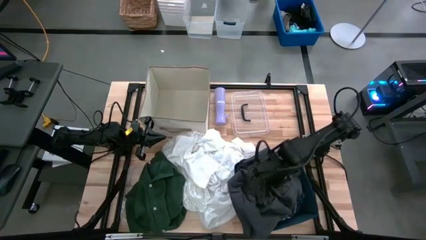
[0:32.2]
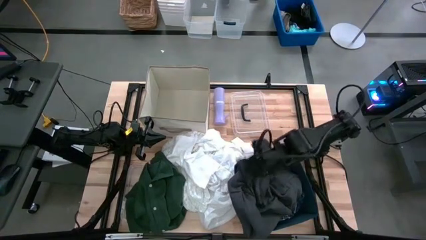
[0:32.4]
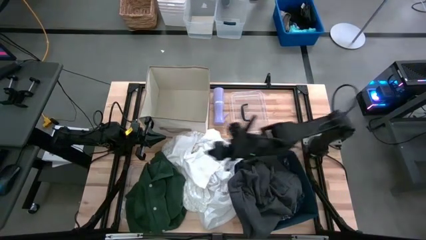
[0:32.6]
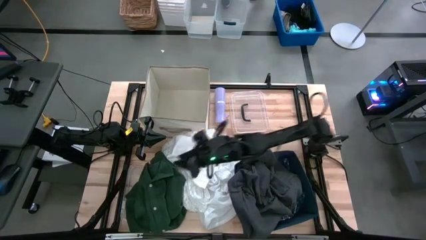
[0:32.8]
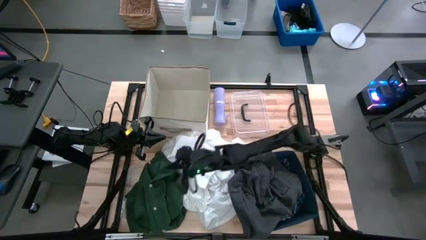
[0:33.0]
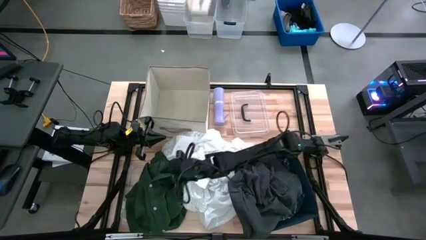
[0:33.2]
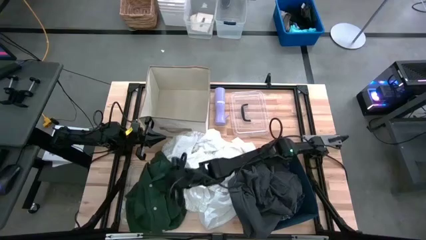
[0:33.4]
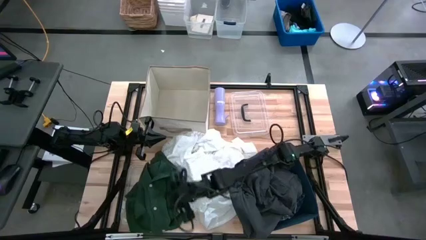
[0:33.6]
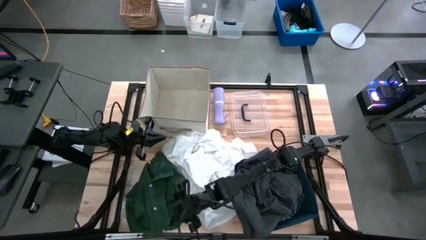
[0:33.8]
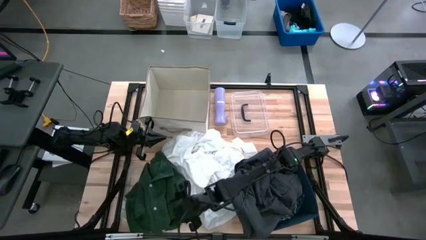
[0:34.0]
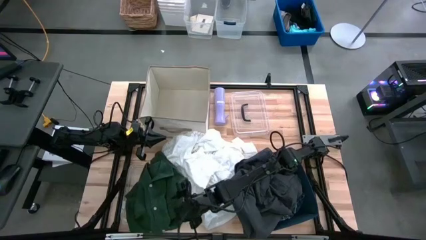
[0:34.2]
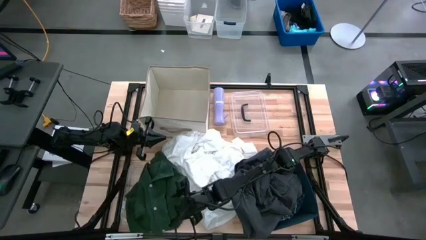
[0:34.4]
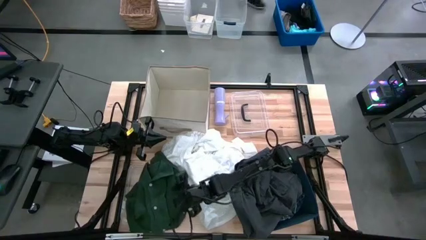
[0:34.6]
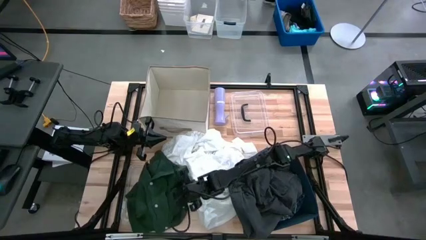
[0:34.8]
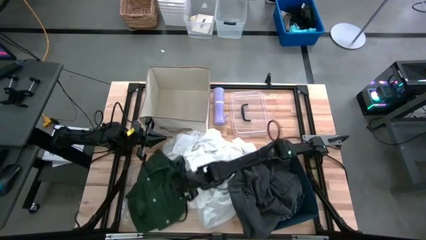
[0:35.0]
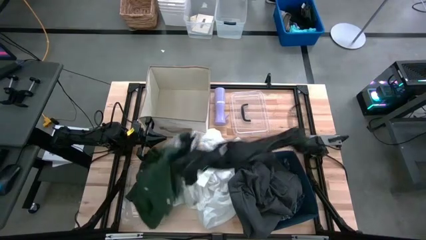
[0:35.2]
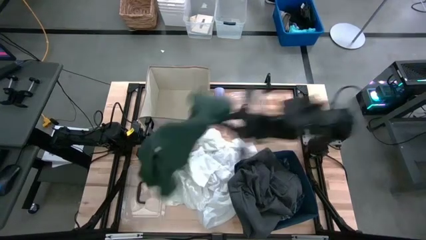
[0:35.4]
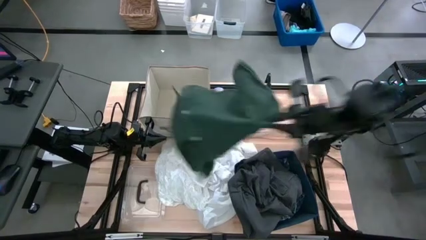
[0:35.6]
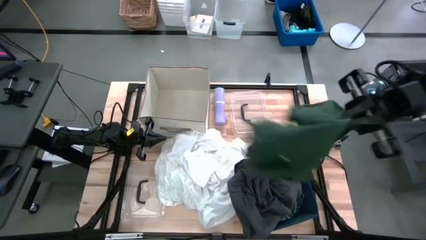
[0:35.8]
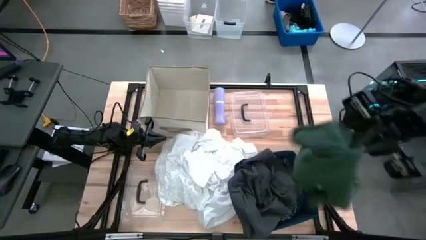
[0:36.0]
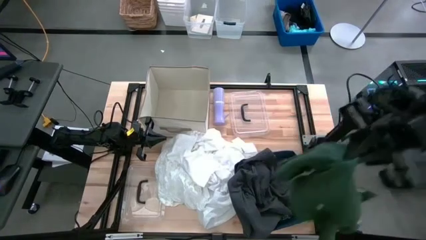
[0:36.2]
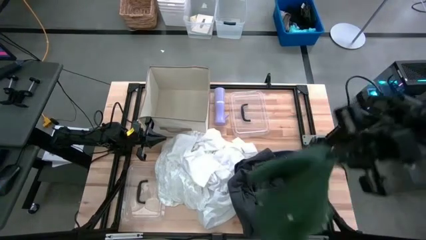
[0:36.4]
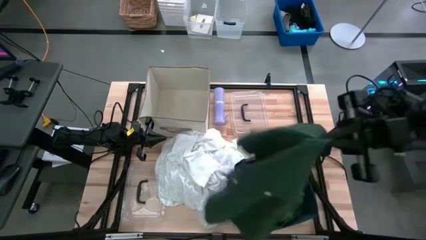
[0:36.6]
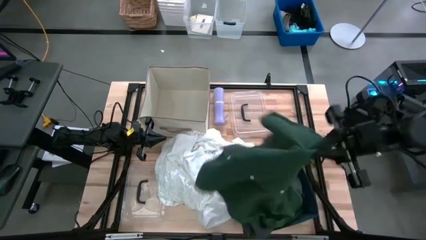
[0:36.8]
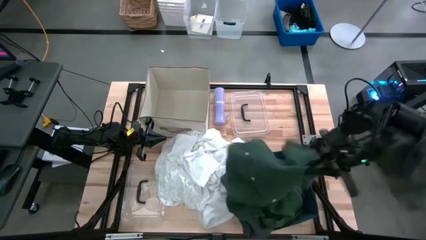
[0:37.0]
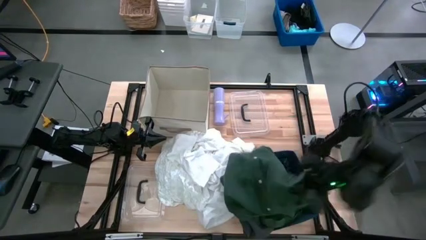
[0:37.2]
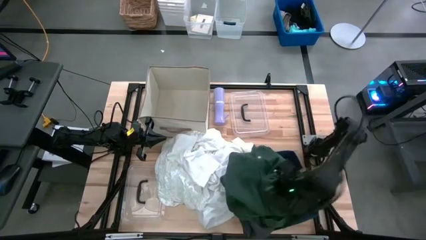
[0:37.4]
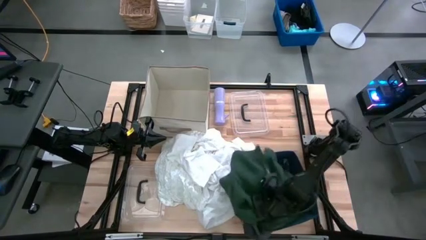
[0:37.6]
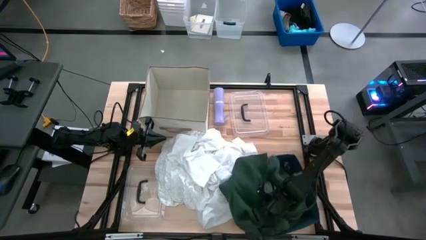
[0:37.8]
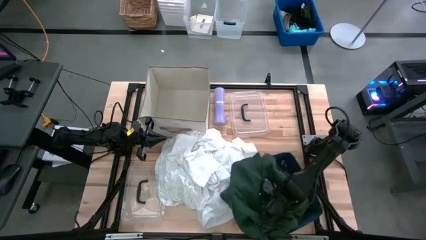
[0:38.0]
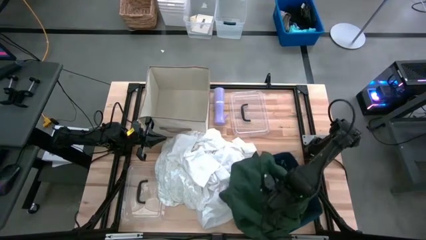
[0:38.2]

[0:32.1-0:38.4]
Task: Sort clothes
Put the green shirt into the blue laundry organizer

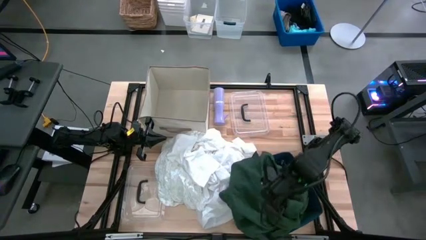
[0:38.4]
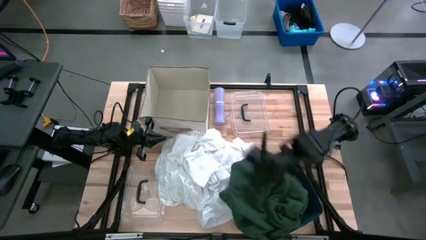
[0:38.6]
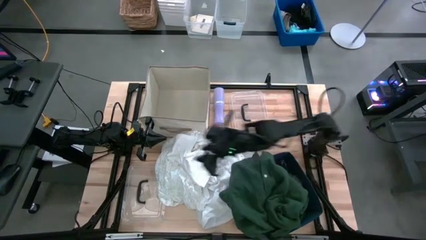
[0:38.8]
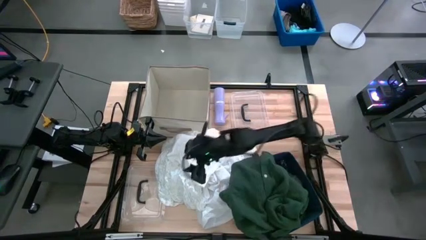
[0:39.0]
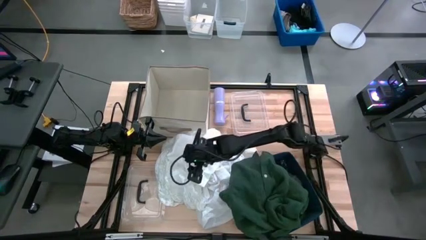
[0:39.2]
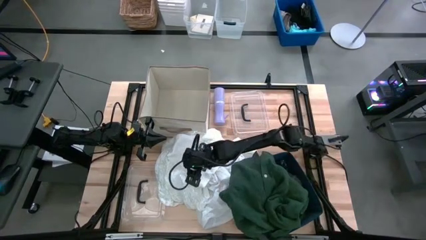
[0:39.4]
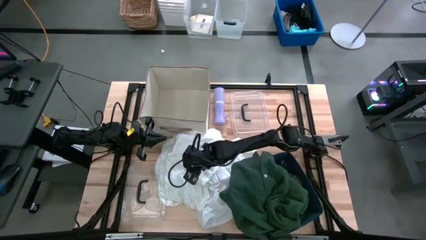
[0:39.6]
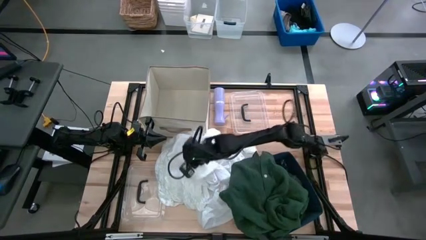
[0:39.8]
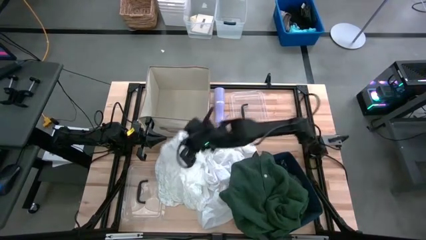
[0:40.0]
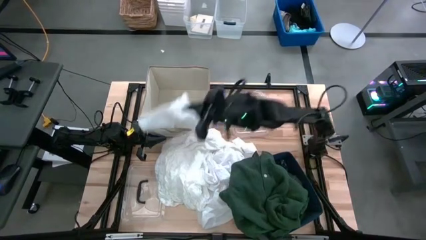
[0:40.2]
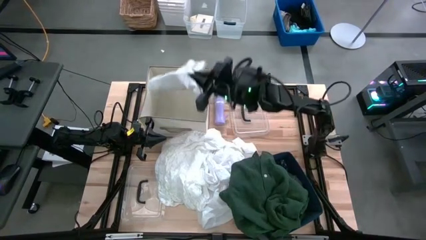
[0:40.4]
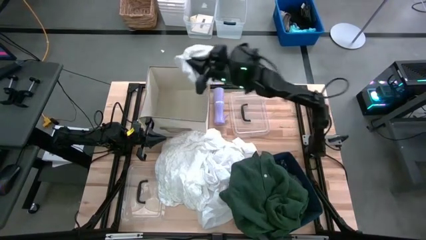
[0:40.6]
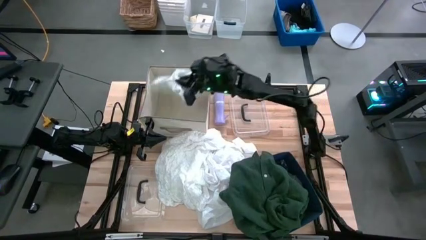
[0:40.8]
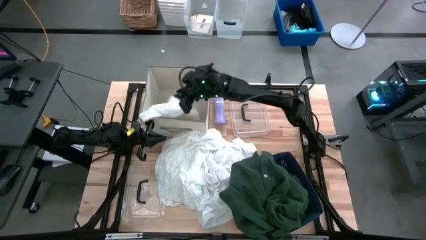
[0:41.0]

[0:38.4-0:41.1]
Put the white underwear into the light brown laundry organizer

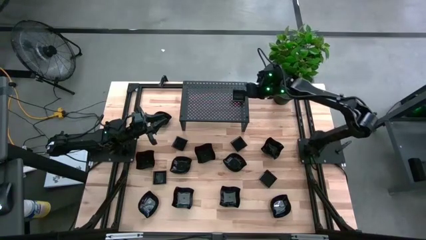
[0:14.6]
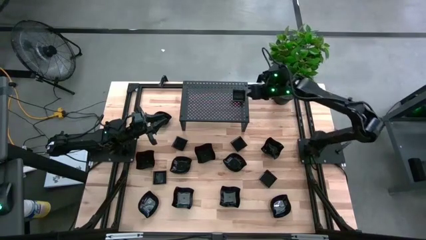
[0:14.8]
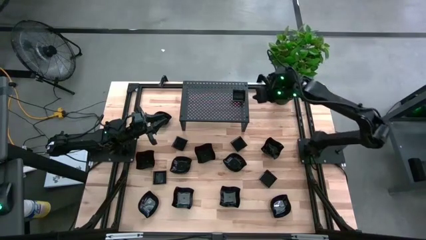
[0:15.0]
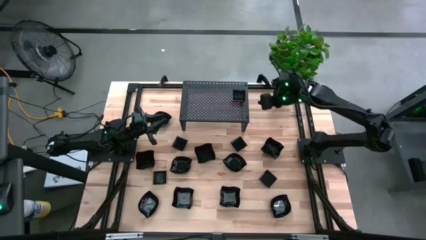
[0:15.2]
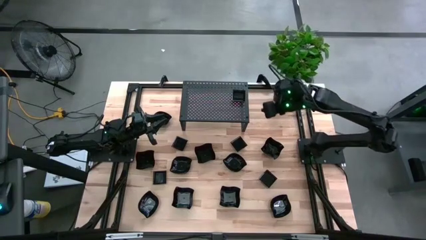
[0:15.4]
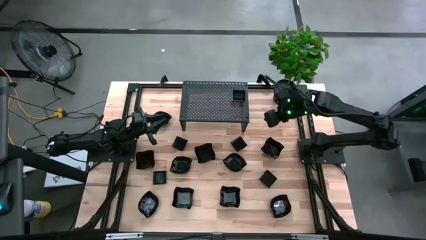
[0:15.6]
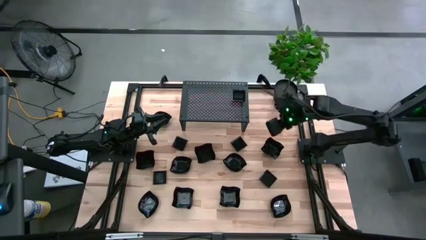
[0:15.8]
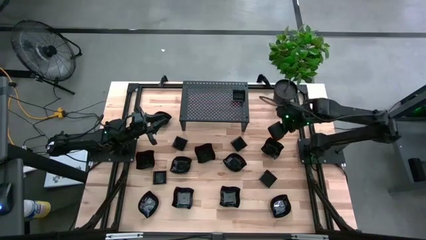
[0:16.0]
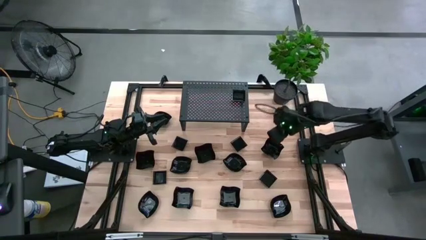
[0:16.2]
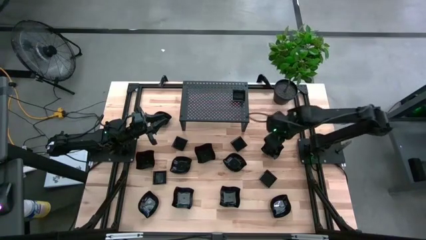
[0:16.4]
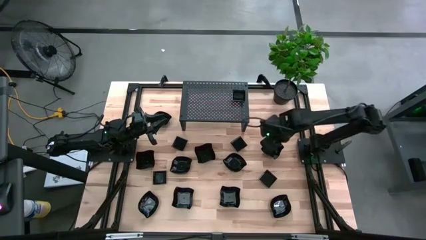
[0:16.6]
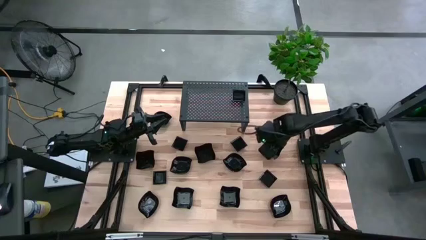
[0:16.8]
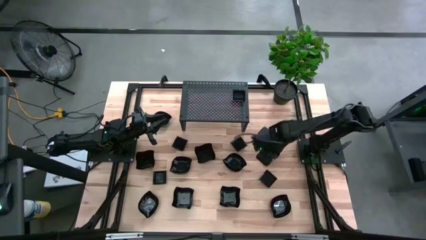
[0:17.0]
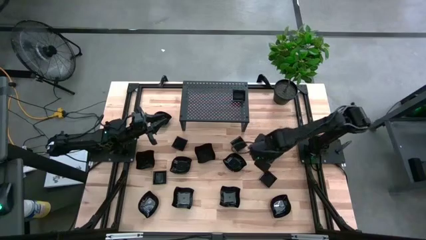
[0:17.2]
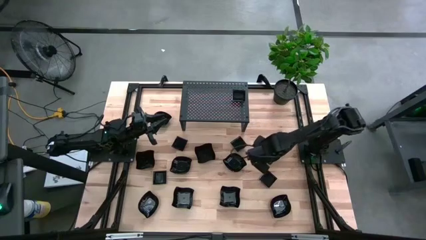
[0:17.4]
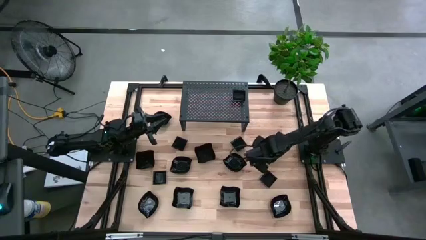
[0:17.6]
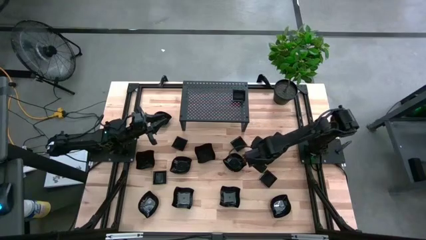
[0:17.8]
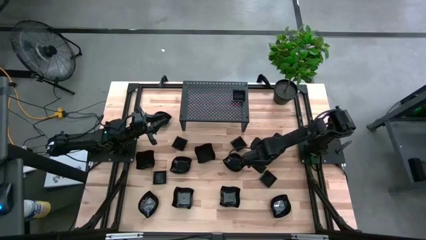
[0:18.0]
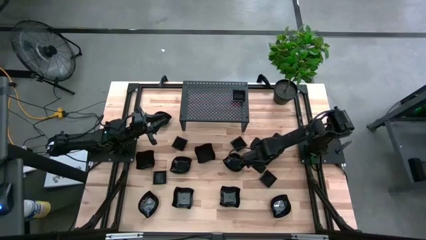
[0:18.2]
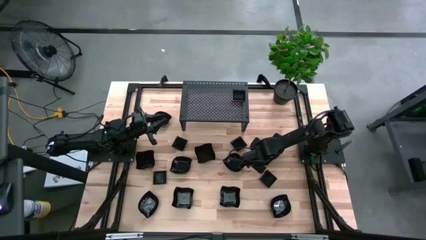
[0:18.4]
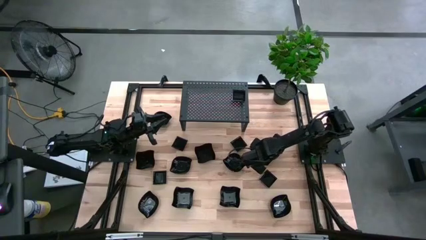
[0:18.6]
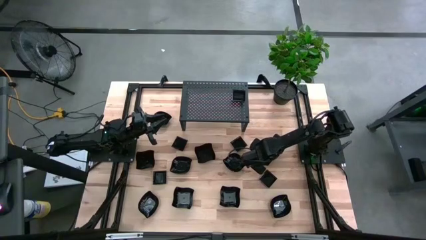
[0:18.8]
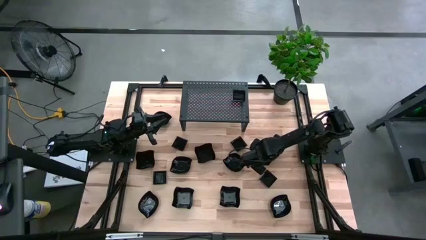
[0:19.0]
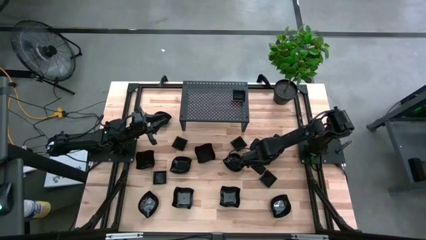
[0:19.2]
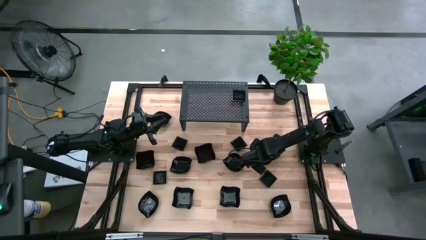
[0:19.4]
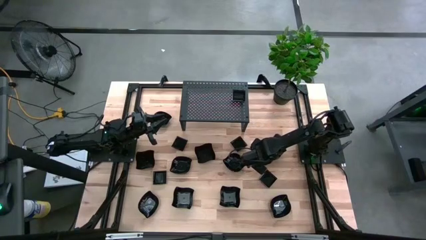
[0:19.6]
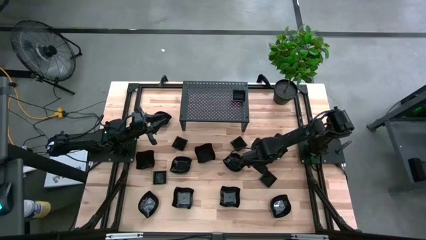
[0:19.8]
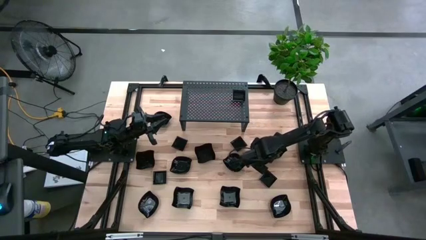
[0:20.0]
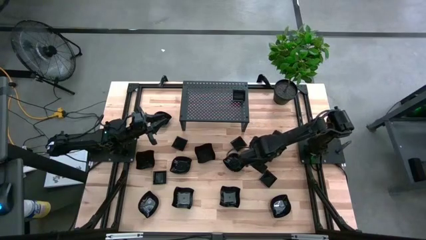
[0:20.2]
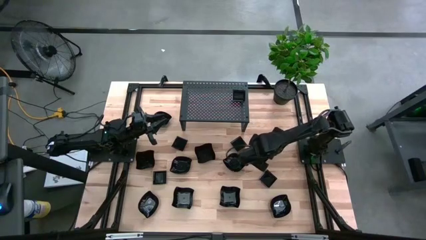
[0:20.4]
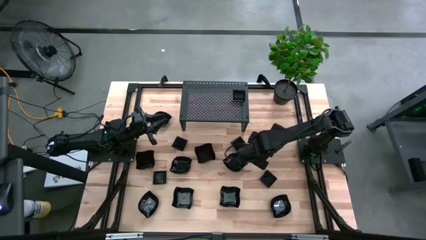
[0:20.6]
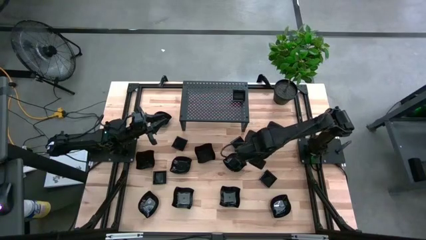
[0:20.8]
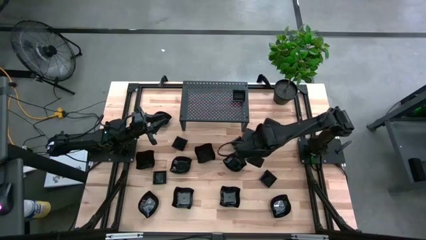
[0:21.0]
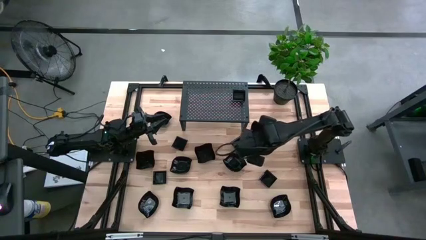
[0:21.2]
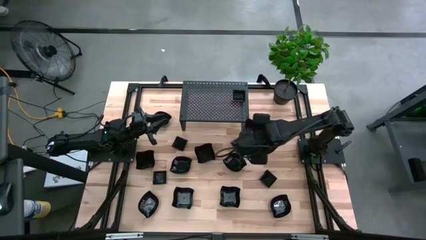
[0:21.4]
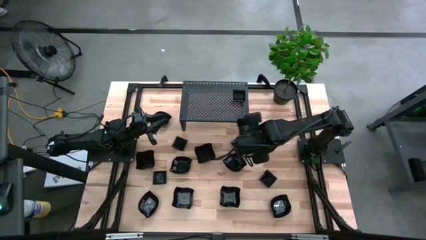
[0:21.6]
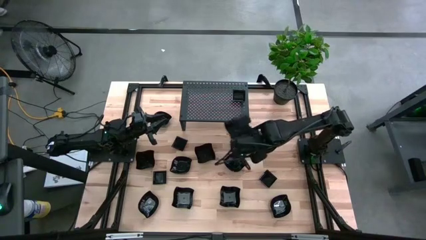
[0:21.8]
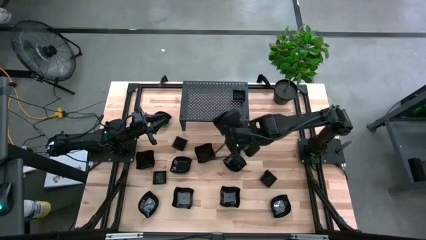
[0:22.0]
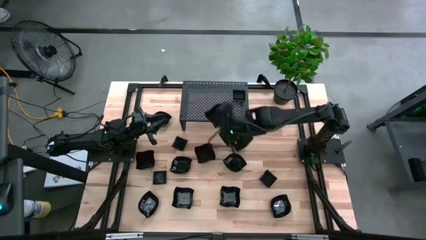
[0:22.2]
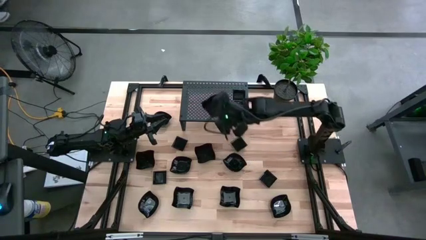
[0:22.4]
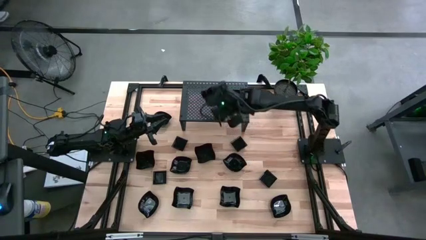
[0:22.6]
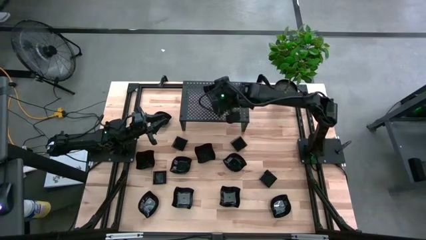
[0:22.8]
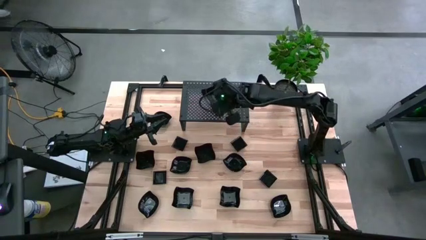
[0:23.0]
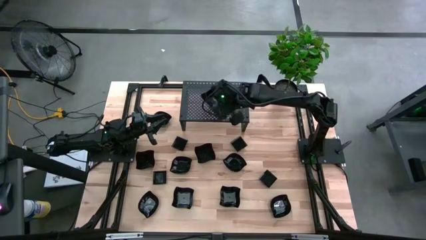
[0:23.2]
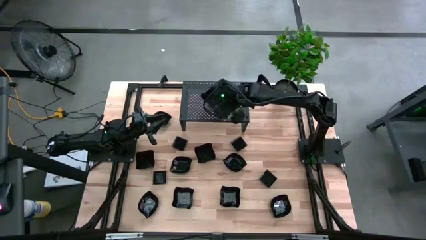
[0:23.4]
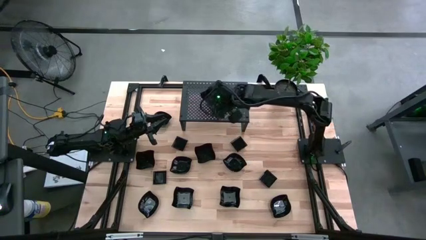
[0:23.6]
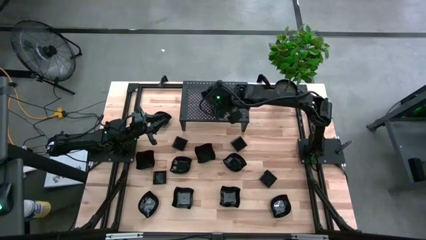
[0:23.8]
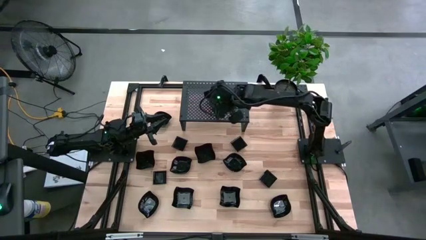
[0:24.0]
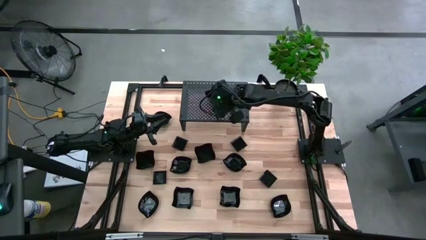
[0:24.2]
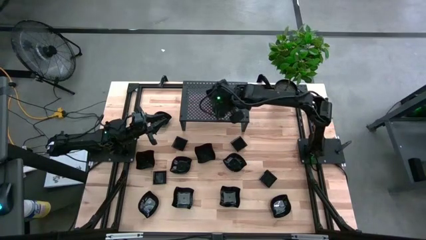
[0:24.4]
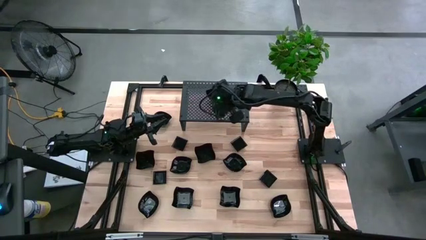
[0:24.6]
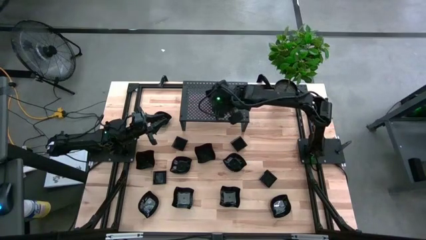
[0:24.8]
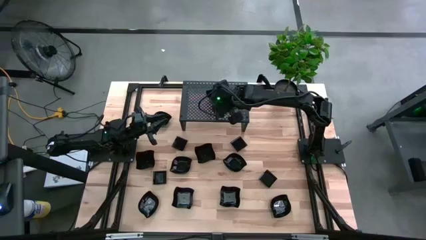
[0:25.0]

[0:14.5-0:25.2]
Task: Pick & Place Mini shaped plates
Put the distorted square plate on the shelf
